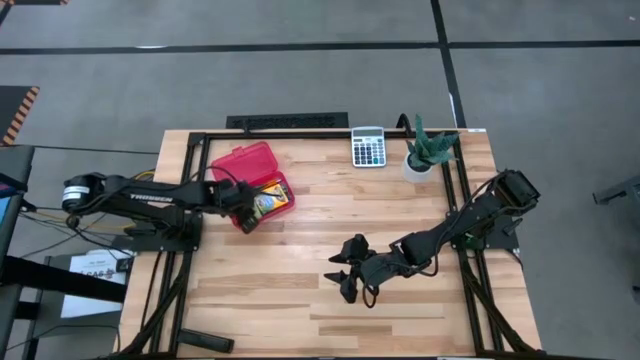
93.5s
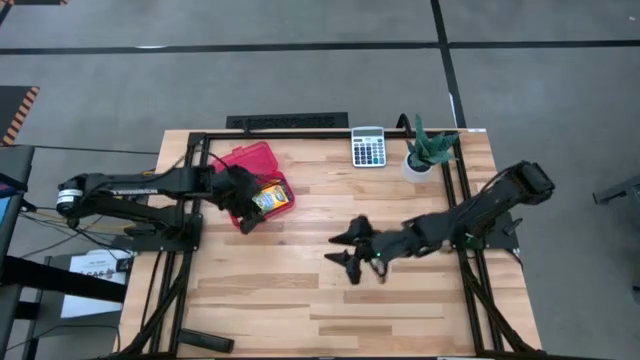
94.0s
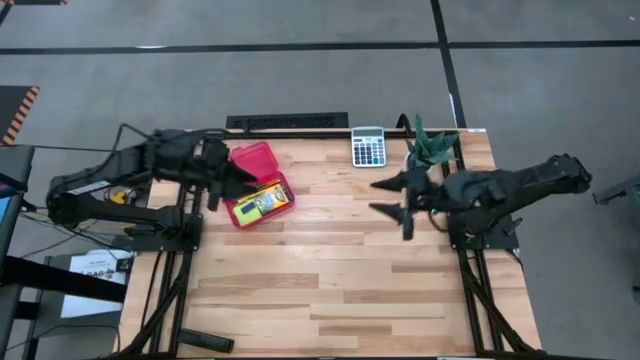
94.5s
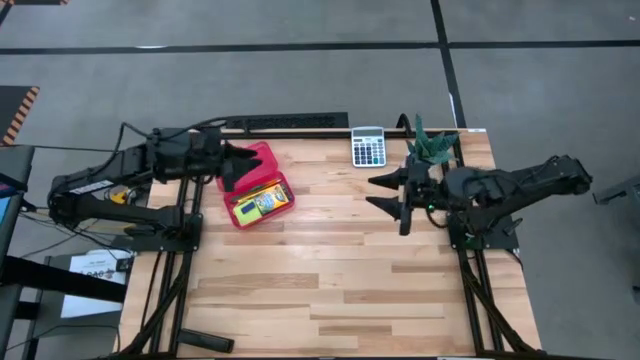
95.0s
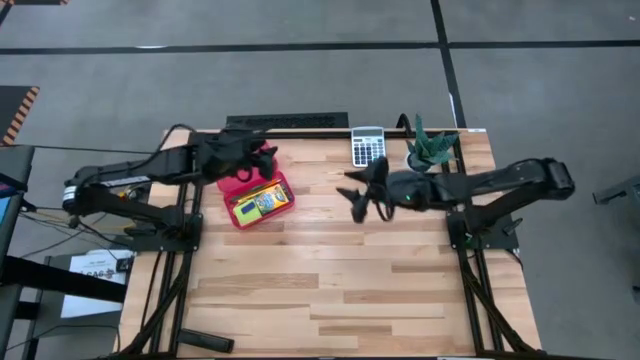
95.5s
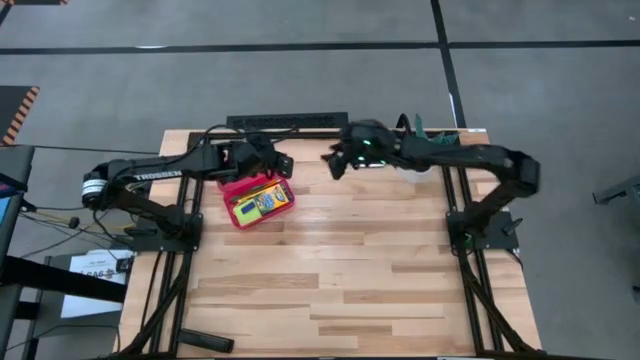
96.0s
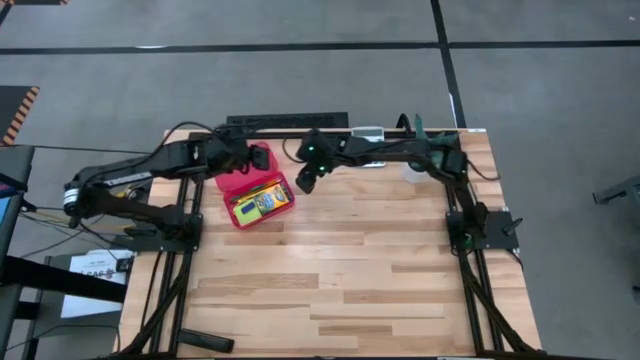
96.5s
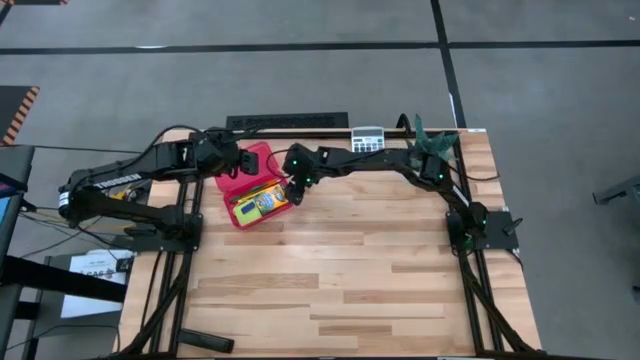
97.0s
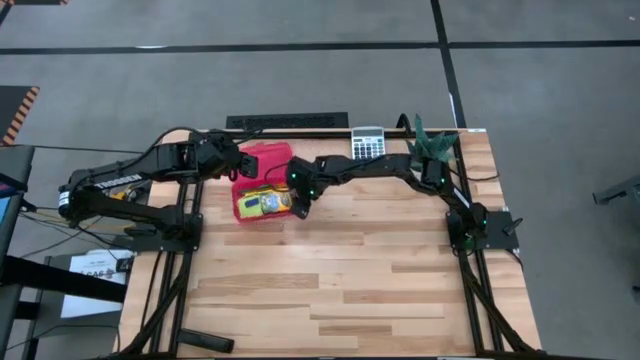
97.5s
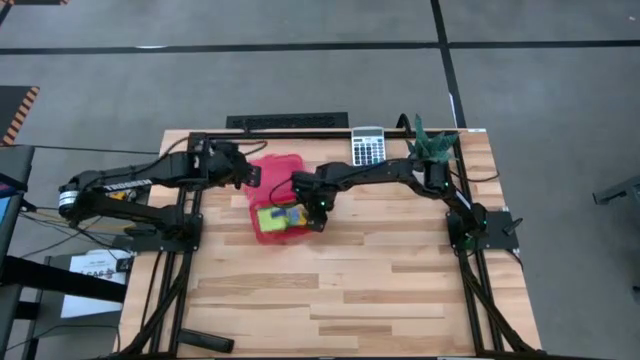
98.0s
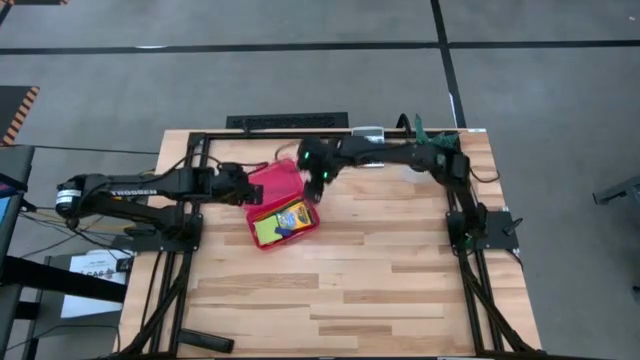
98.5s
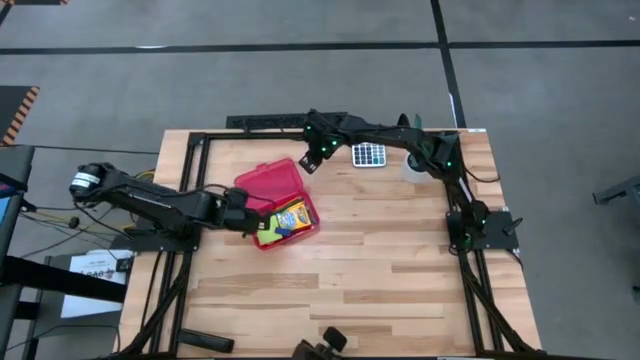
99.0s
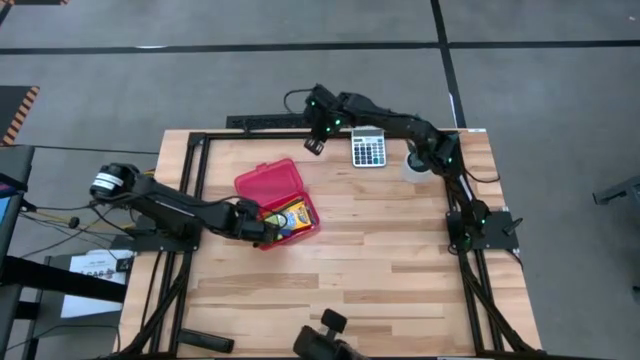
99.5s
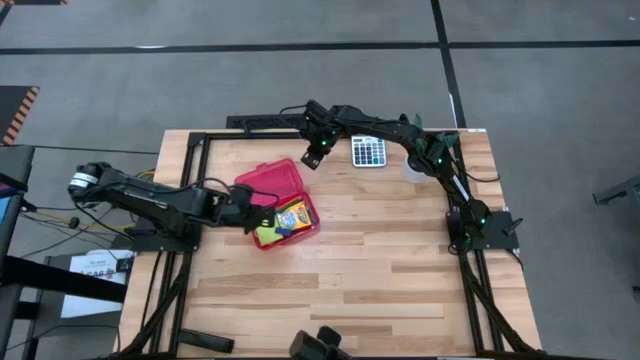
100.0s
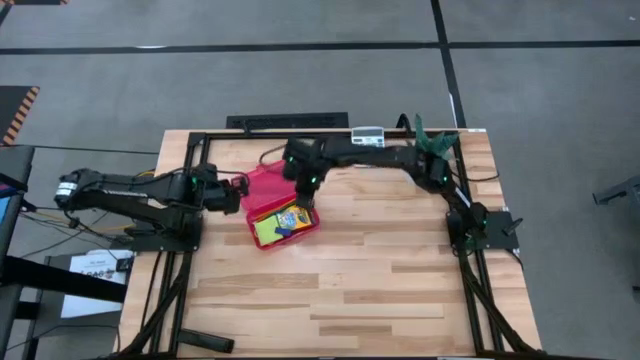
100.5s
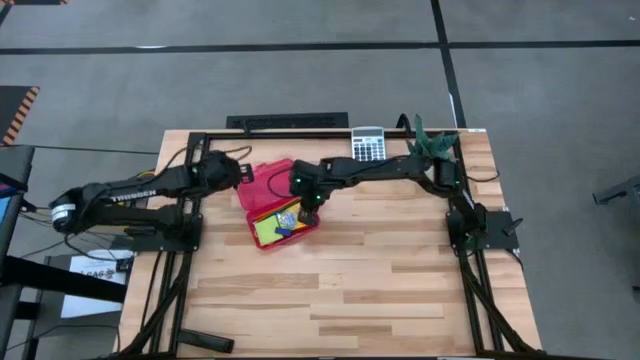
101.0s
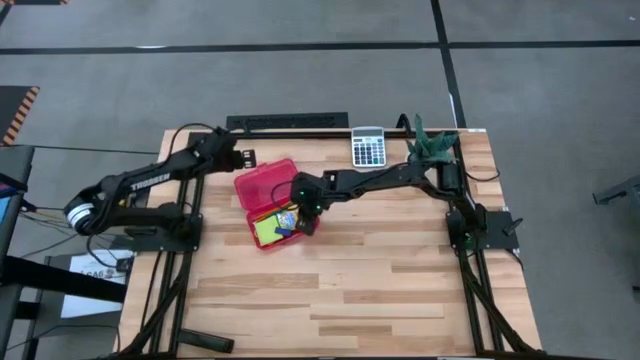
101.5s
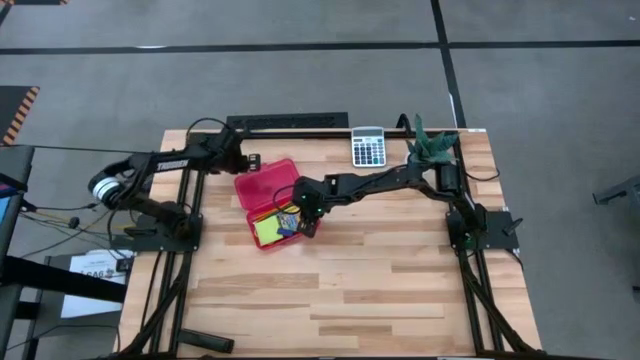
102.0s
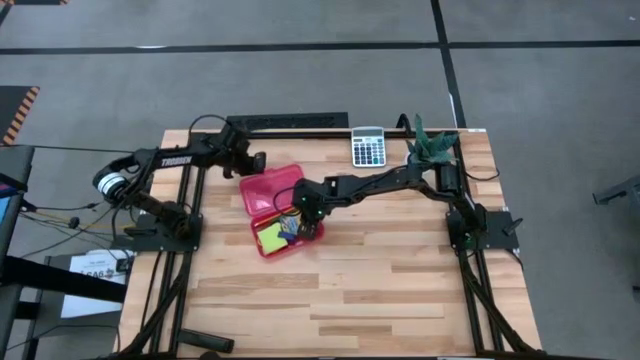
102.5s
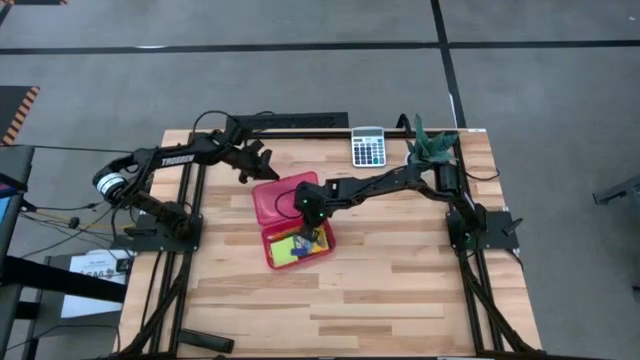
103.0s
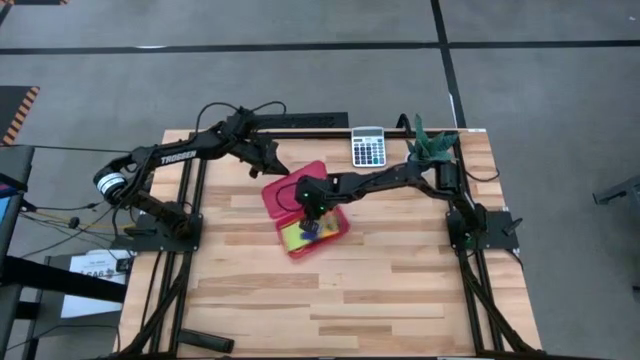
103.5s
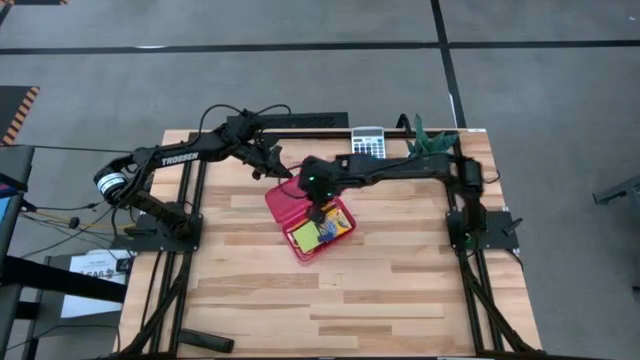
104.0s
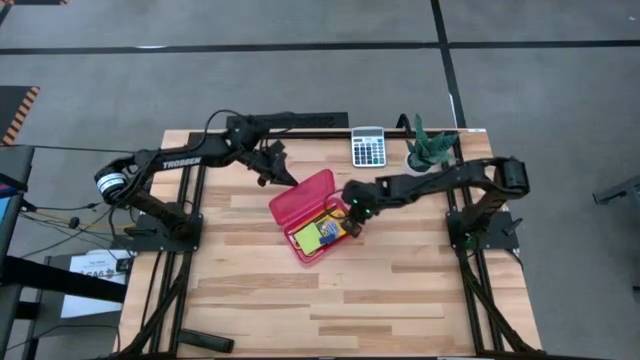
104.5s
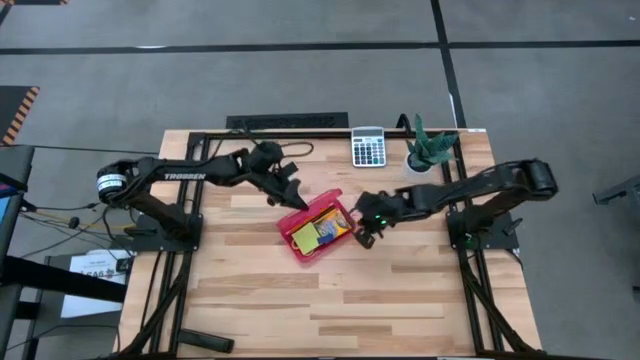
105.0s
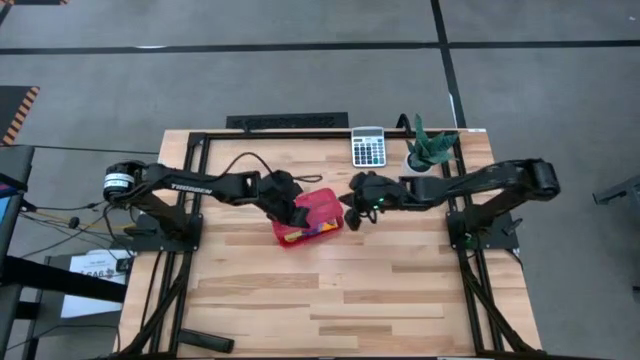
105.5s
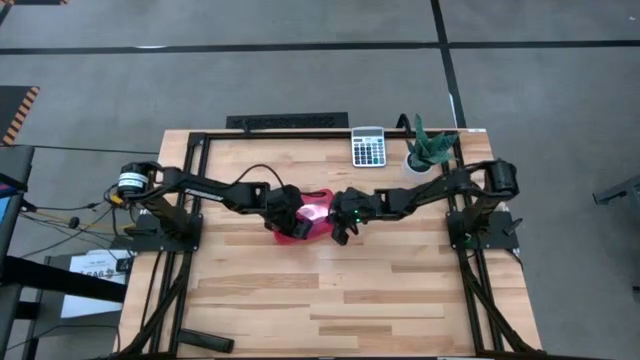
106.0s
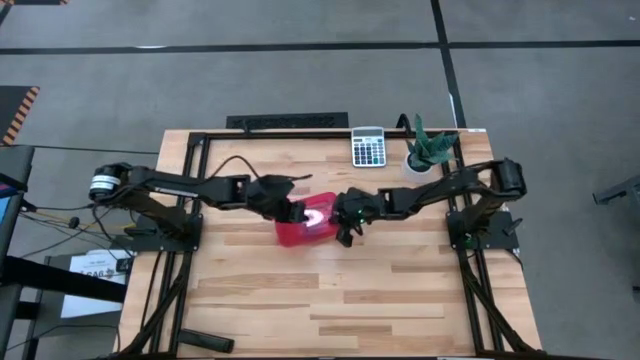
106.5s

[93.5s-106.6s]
Task: Pack school essentials
Close the red supply box

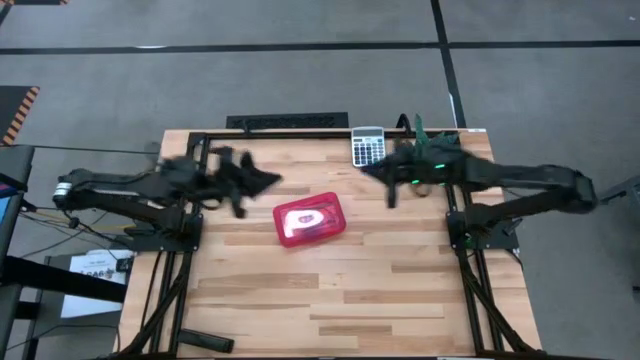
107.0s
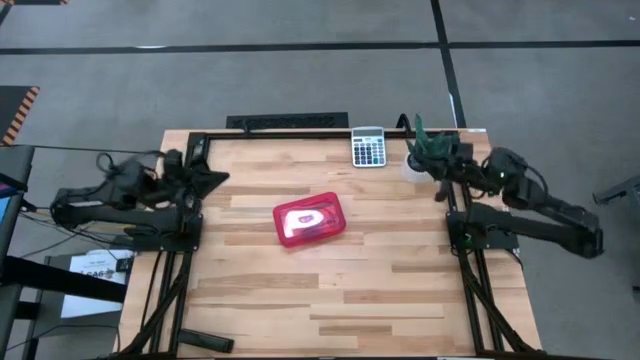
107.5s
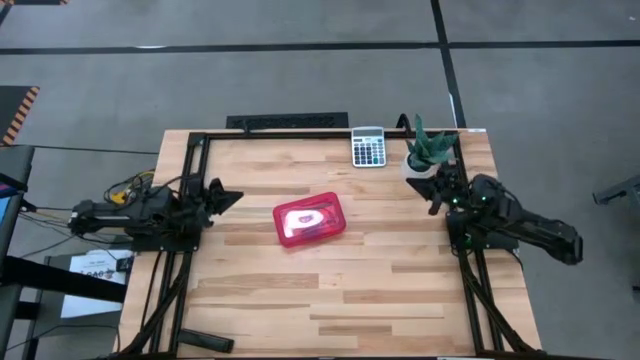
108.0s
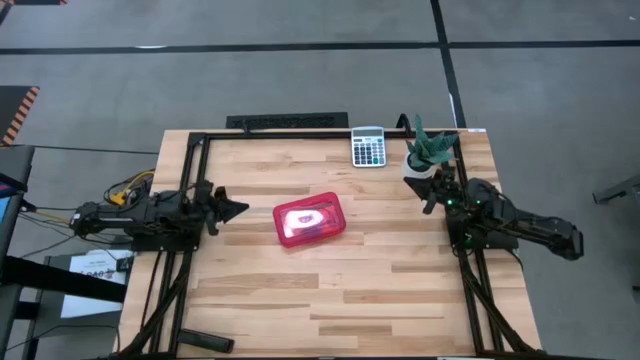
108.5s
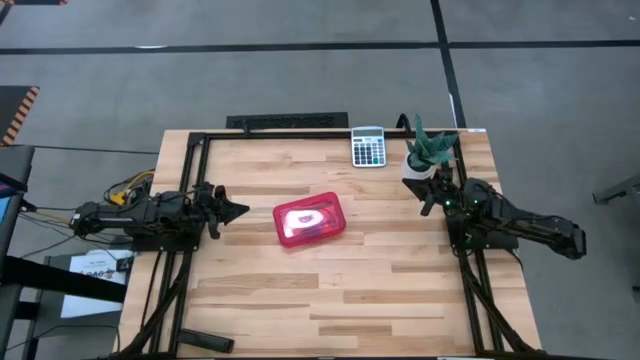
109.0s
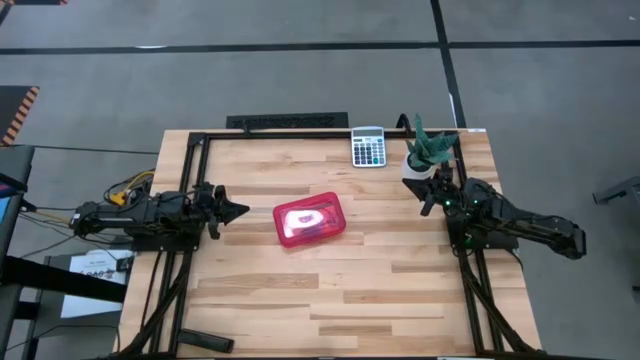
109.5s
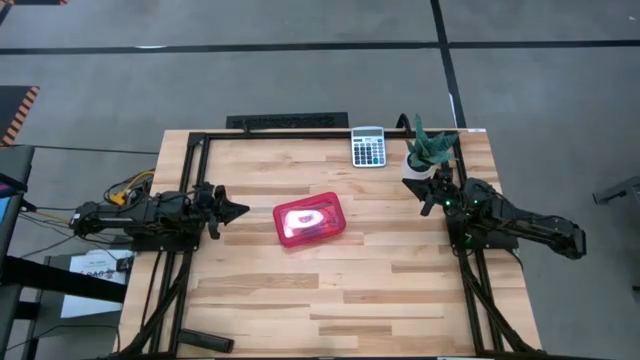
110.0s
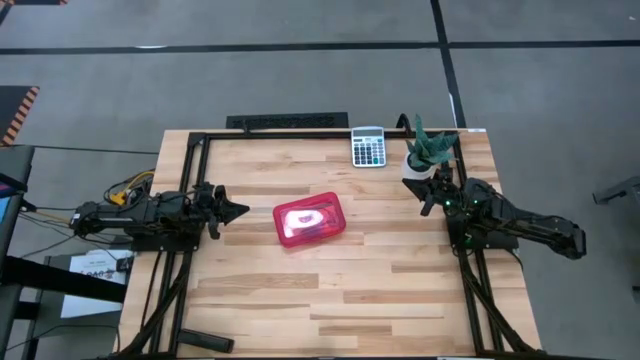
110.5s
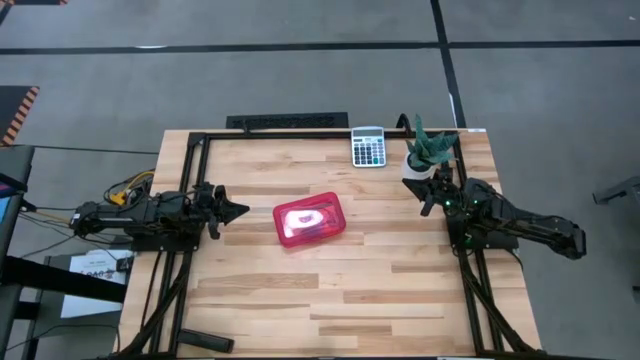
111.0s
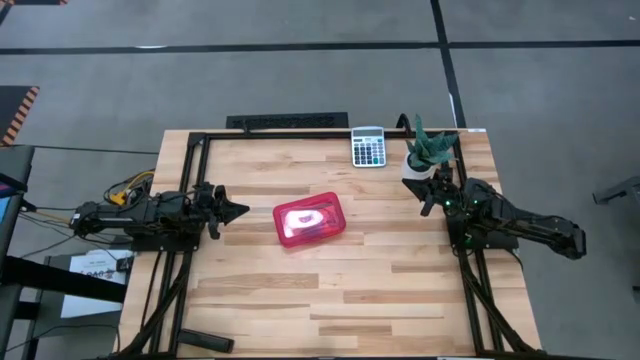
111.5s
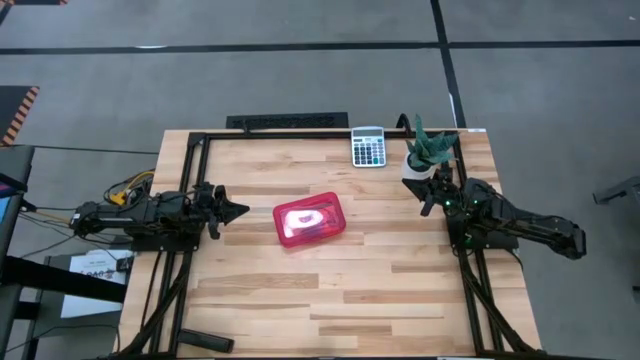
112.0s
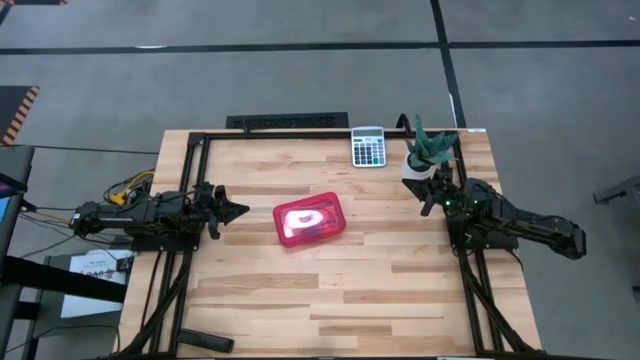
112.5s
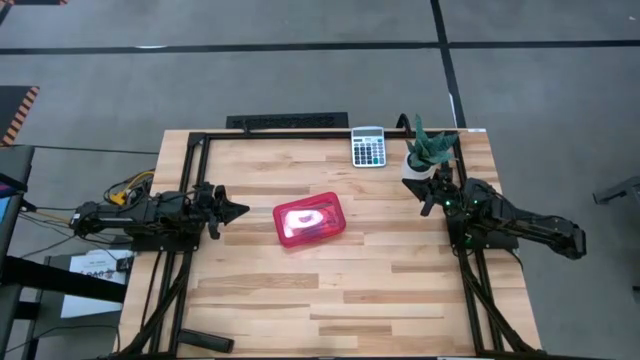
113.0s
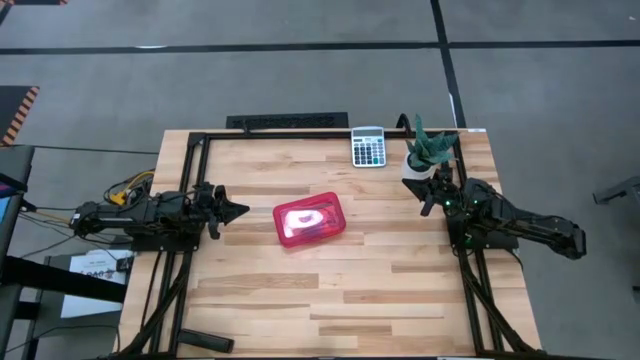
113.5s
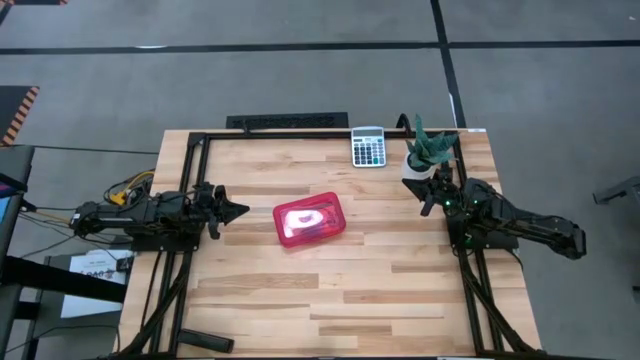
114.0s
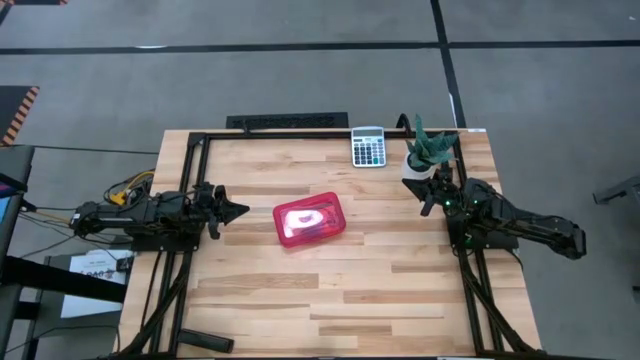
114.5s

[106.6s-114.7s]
Return to Home Position
